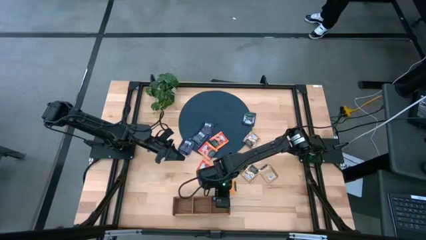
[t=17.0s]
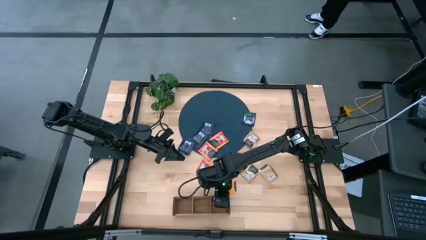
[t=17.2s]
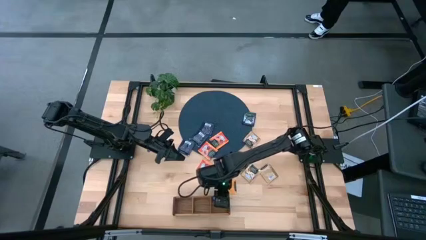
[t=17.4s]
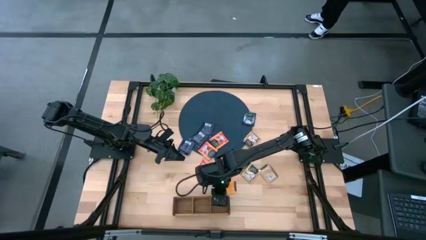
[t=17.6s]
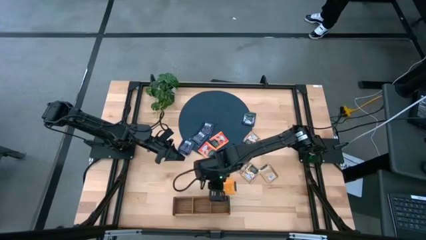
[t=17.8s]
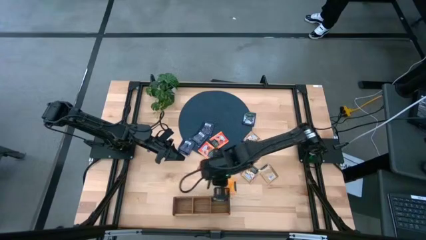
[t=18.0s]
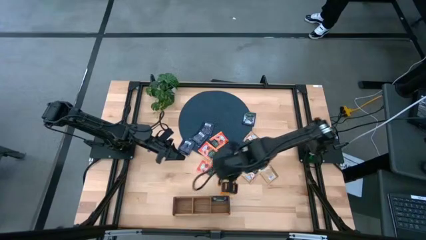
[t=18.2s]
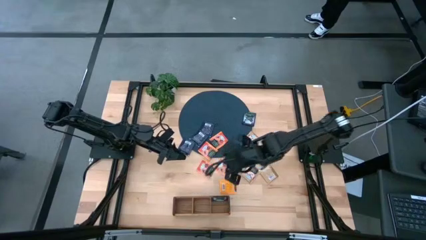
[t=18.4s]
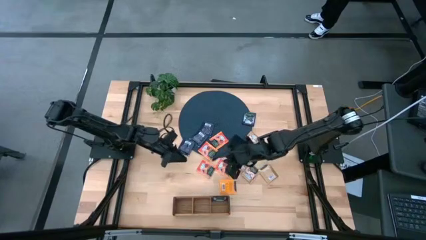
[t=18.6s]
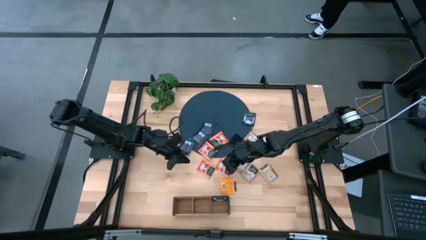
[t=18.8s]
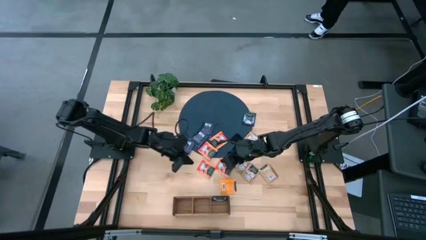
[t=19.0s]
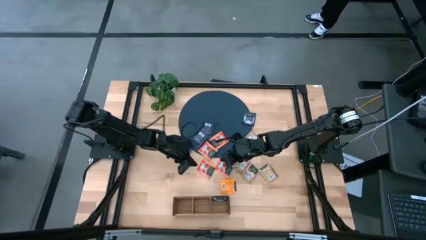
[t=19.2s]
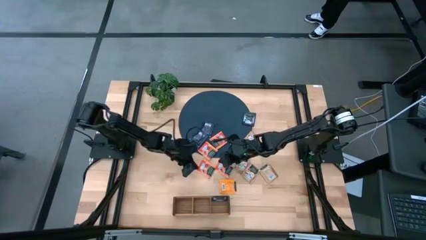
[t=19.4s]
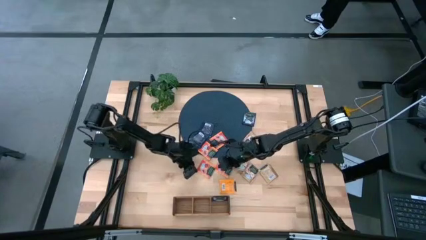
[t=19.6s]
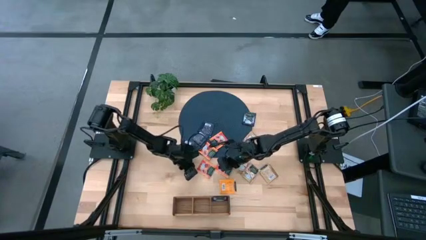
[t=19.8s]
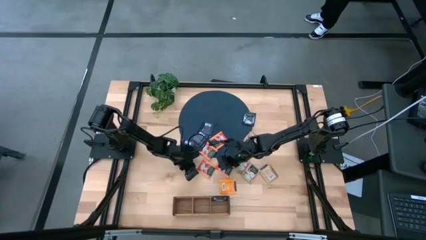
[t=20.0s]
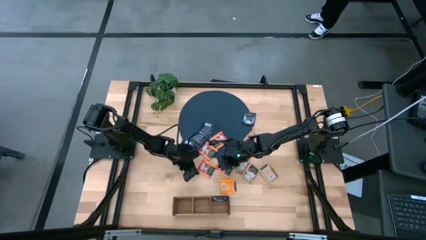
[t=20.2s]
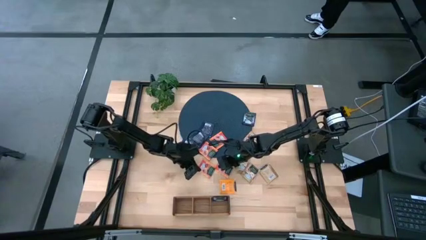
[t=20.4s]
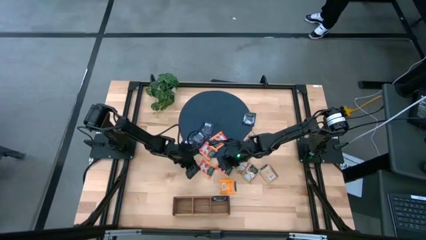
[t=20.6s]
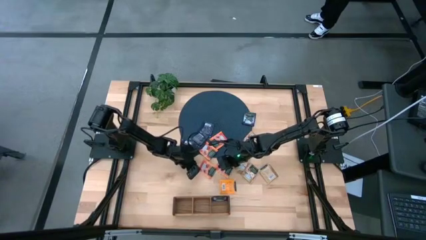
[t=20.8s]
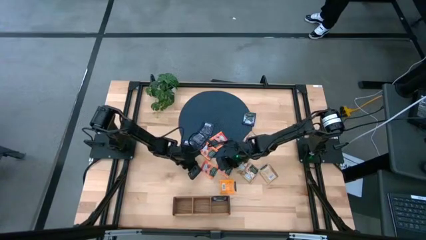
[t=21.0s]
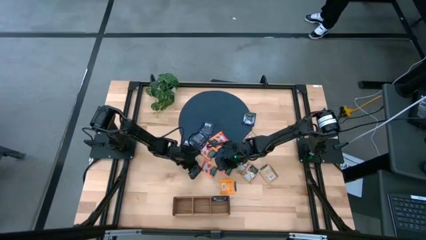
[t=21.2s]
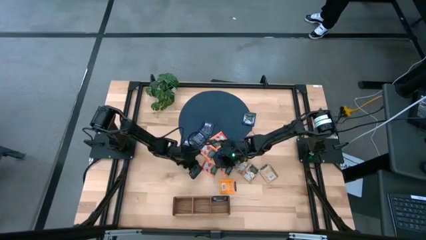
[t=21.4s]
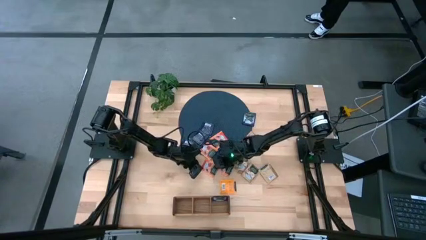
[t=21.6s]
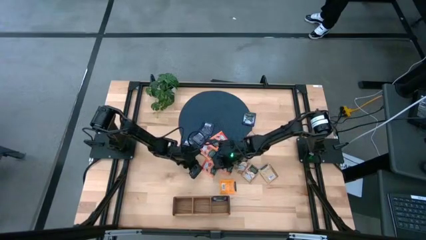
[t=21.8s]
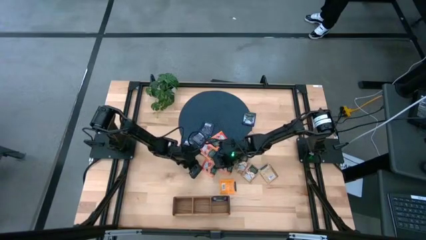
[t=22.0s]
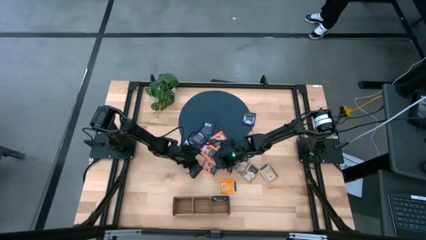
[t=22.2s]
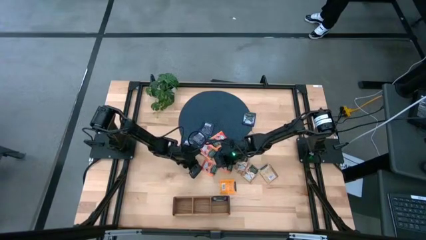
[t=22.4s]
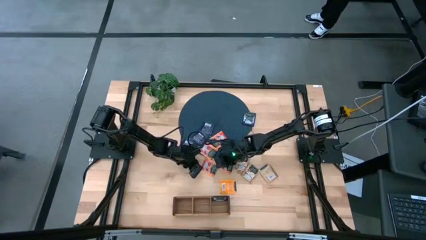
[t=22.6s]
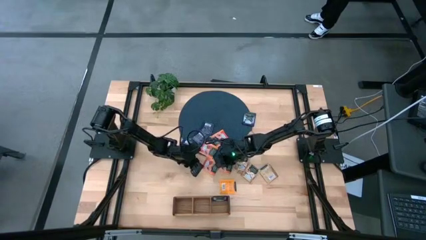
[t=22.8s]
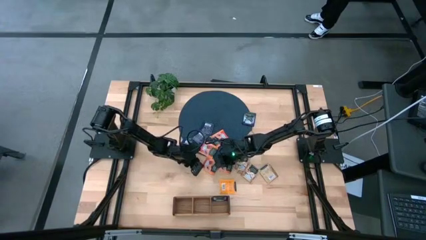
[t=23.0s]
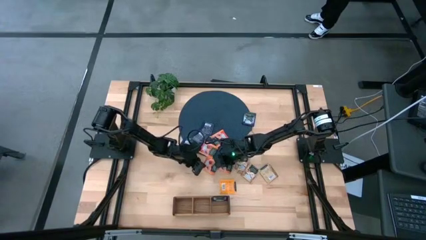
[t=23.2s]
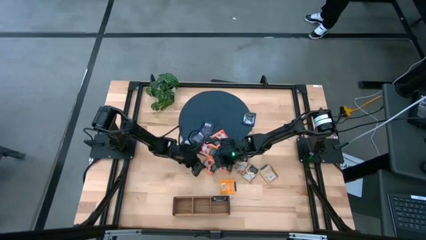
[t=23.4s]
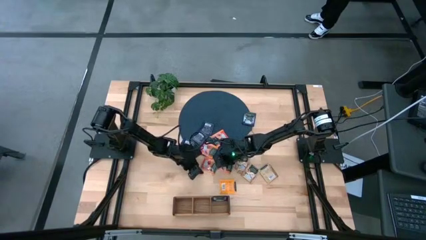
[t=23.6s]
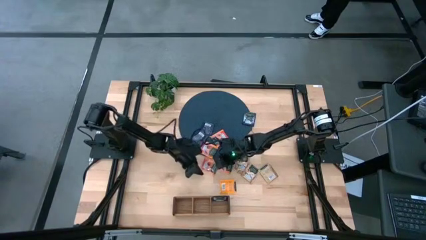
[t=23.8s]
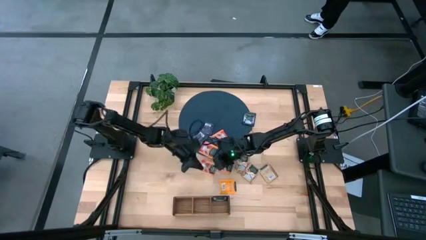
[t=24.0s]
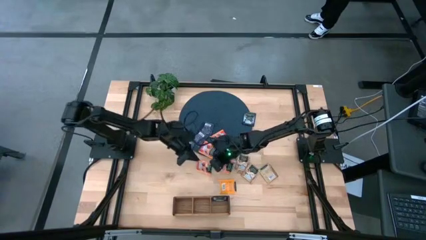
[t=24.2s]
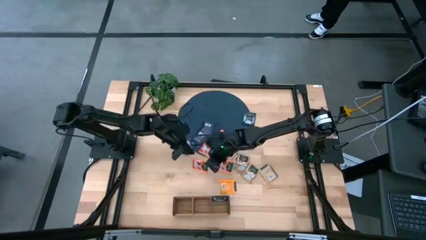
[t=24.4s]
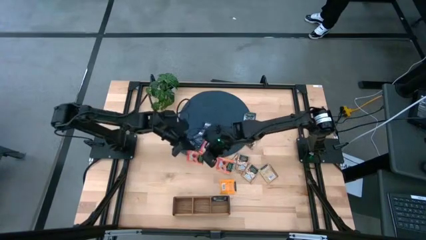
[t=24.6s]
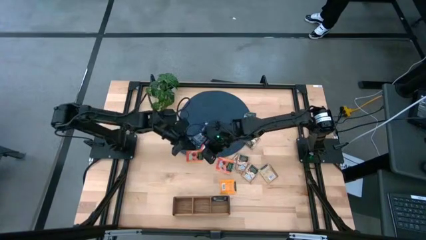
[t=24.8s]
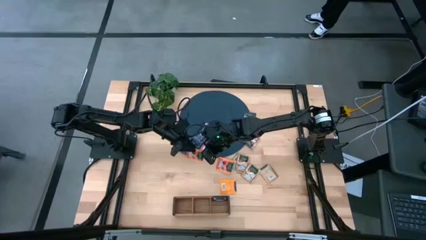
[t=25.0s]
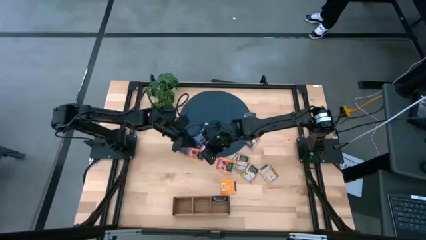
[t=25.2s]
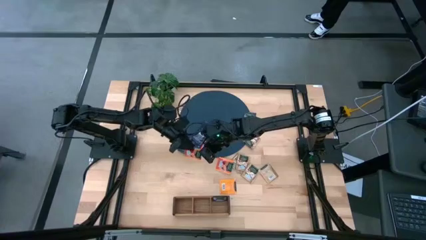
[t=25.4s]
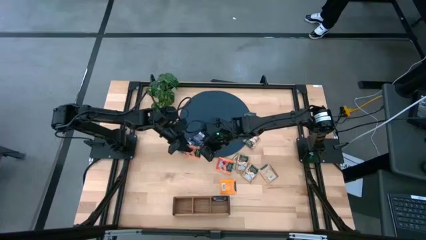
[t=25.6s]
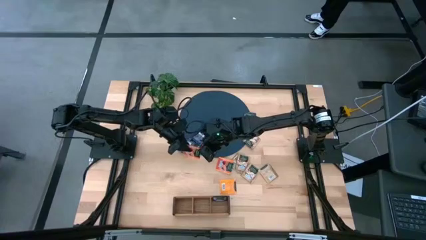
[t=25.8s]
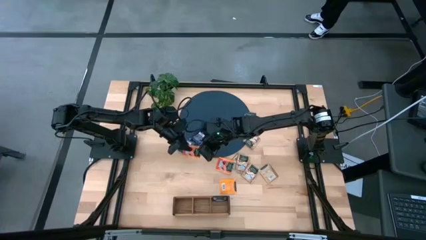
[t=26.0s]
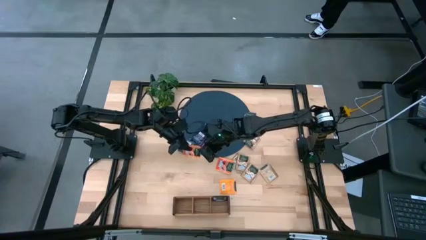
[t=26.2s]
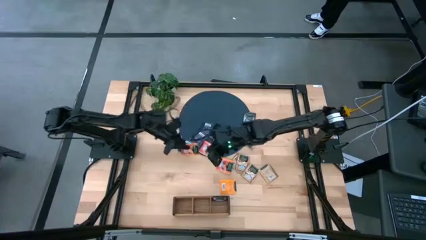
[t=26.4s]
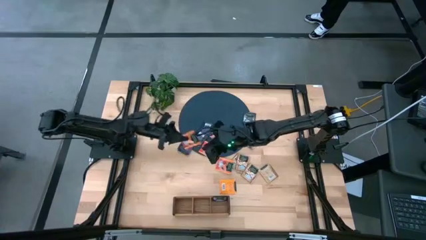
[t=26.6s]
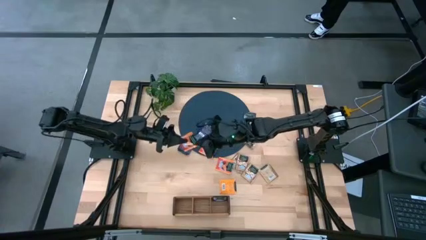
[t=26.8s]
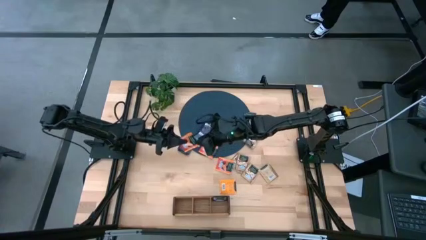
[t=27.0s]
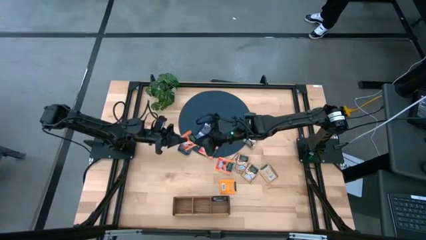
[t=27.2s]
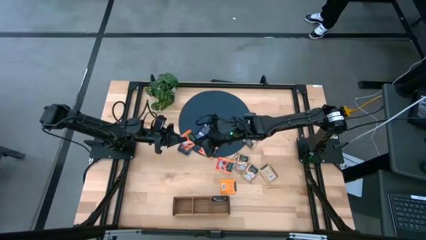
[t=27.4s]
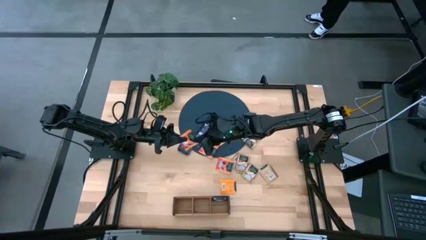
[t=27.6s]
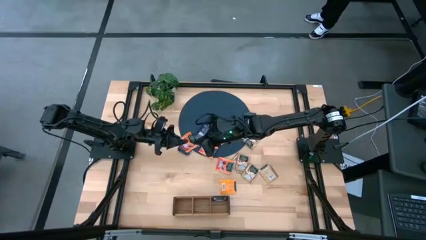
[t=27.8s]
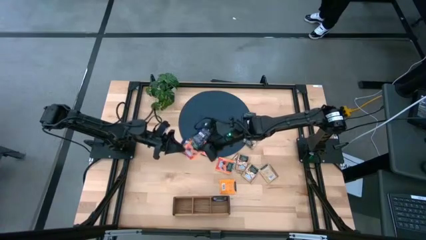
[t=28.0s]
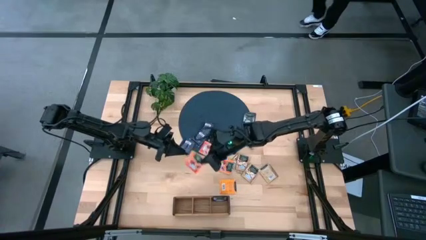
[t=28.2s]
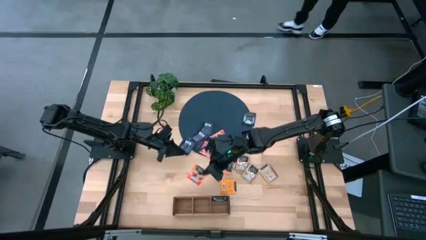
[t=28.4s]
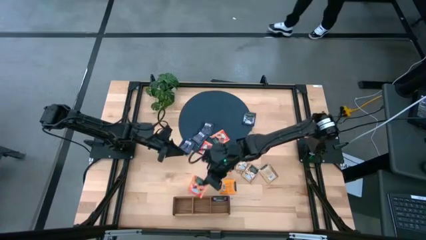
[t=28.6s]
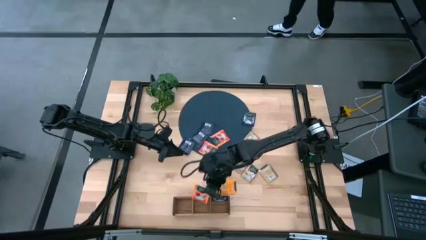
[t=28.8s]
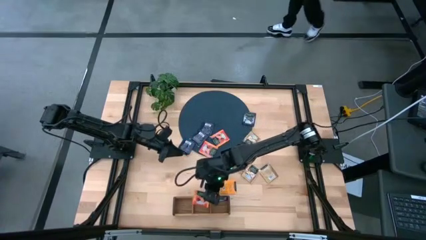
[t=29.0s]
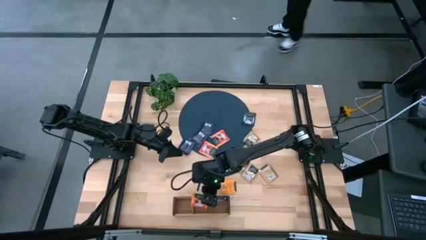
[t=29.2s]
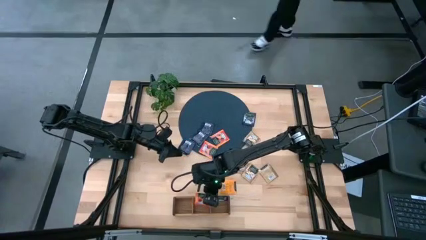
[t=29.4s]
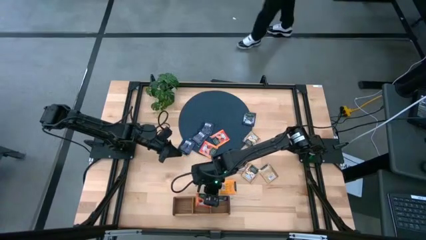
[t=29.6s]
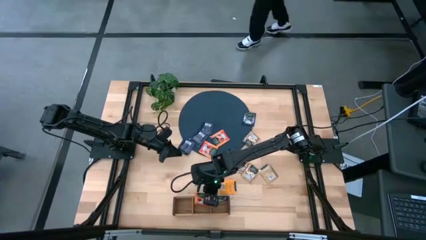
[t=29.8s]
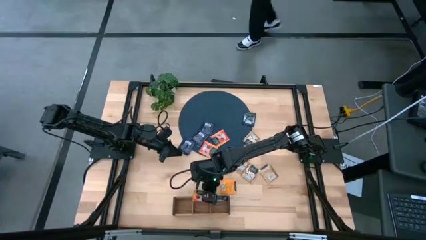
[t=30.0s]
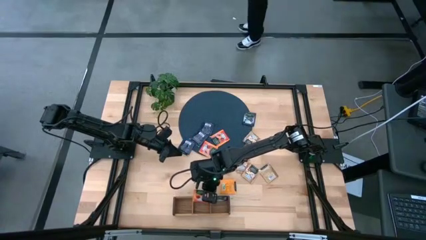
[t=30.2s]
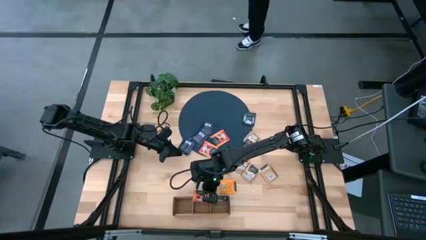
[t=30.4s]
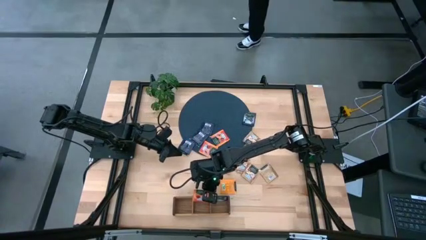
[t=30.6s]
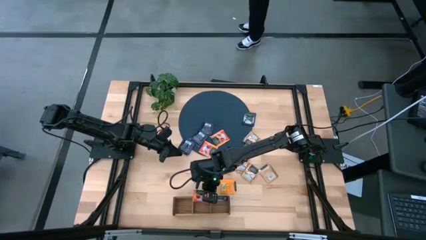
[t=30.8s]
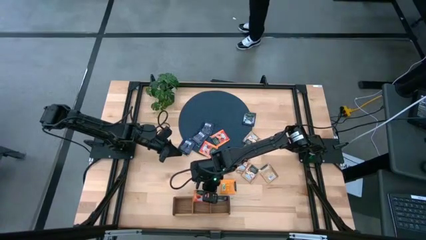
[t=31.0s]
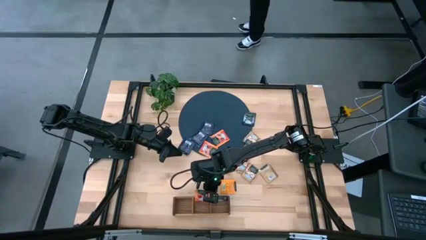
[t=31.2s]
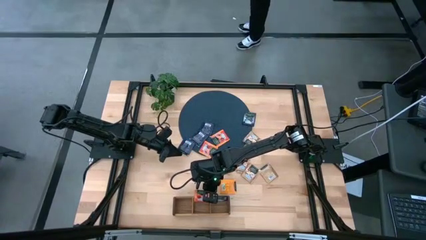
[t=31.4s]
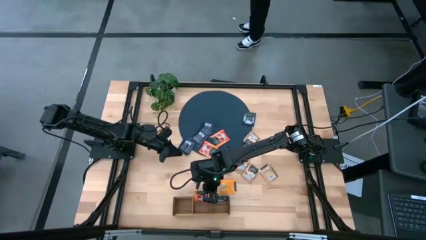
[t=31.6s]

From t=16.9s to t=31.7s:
Task: Pick & Place Tea
Put the orange tea bag into the middle section of the wooden organizer
